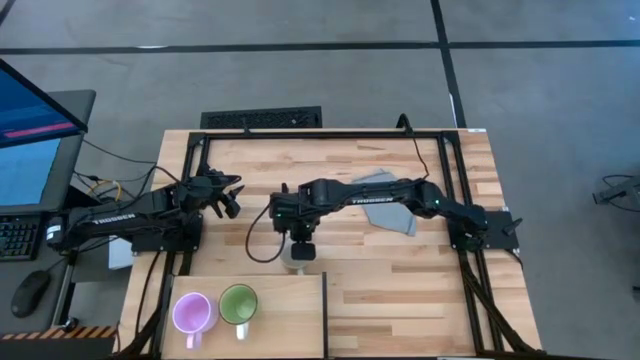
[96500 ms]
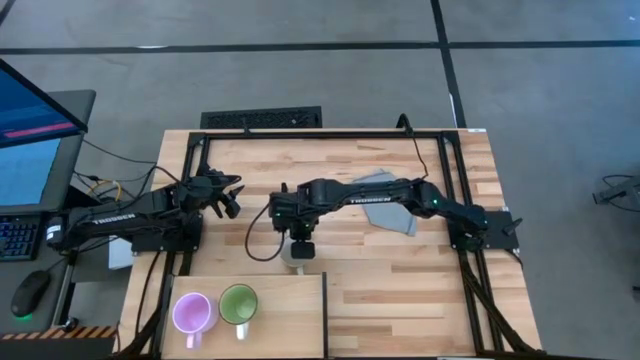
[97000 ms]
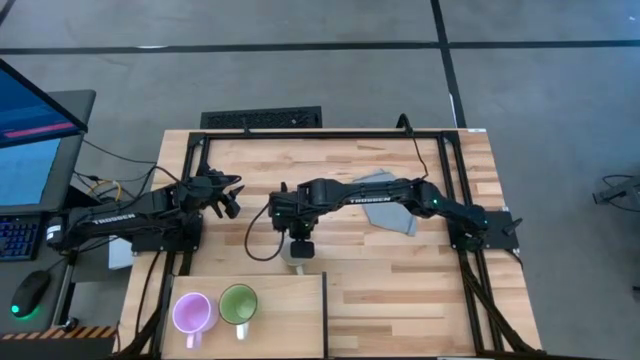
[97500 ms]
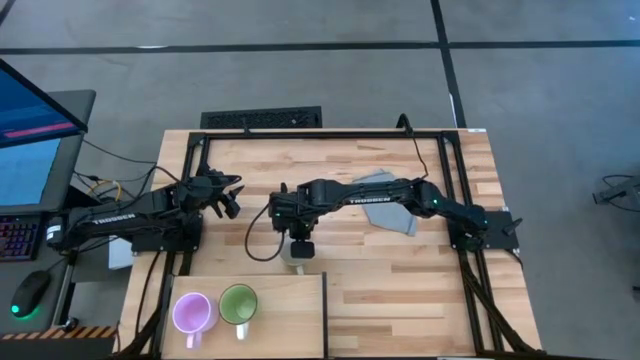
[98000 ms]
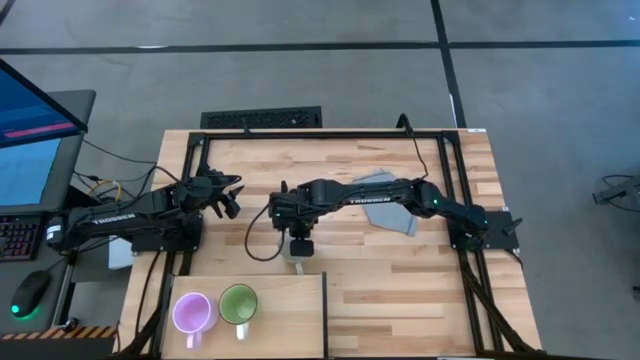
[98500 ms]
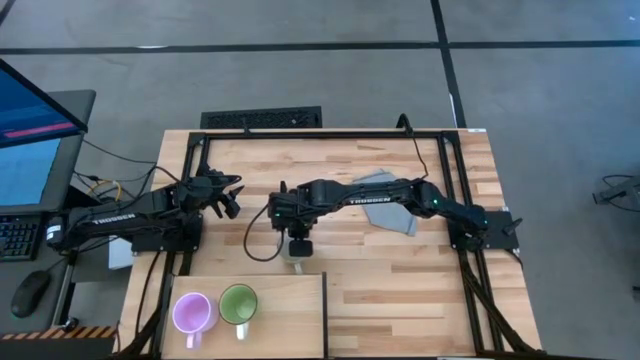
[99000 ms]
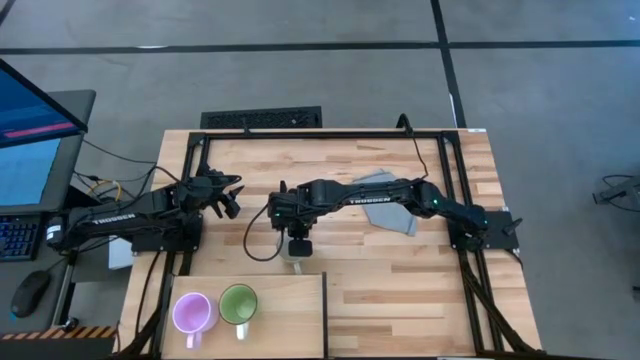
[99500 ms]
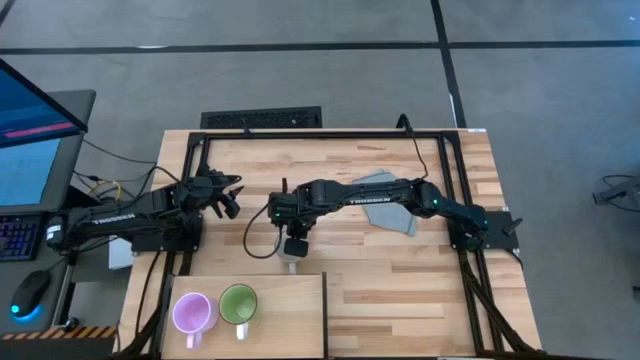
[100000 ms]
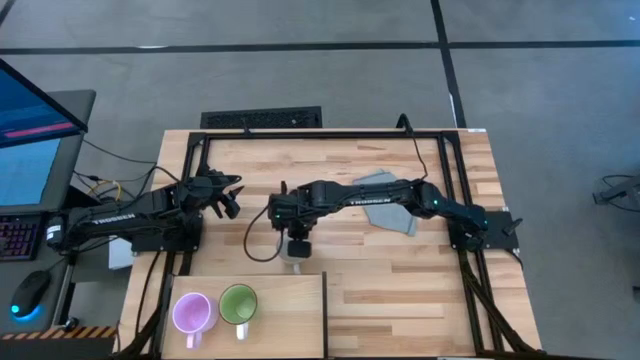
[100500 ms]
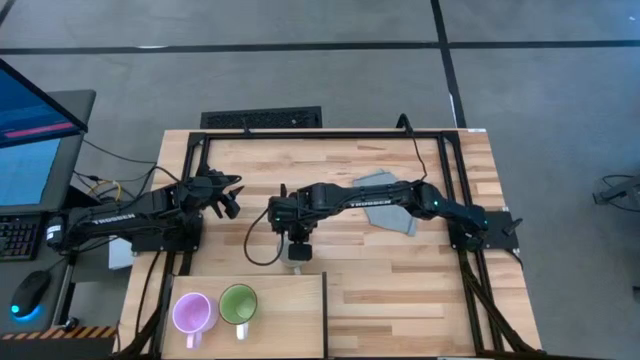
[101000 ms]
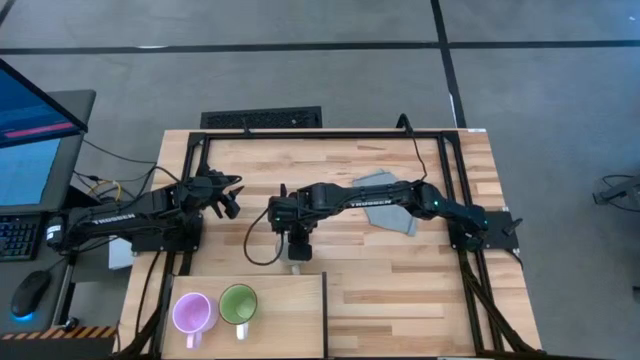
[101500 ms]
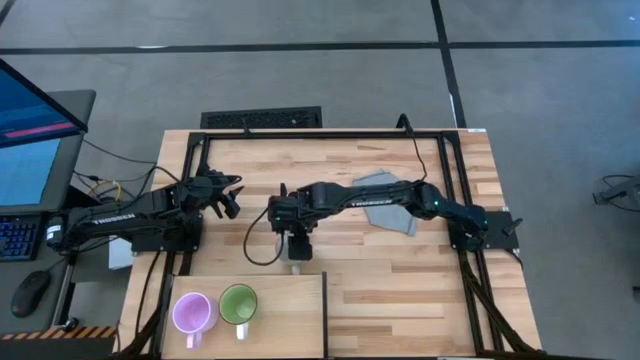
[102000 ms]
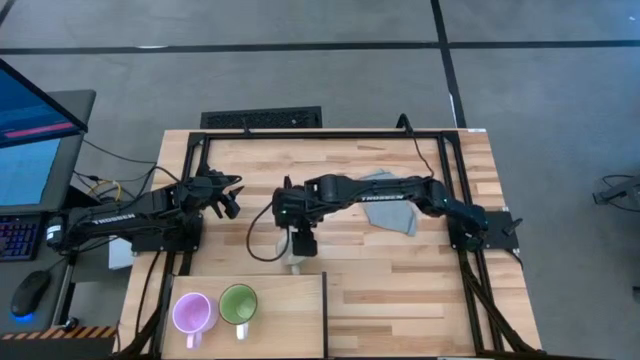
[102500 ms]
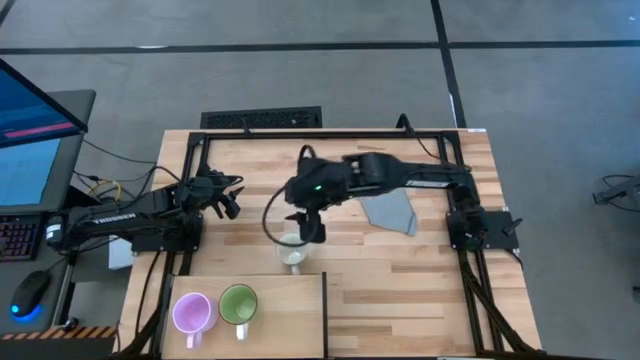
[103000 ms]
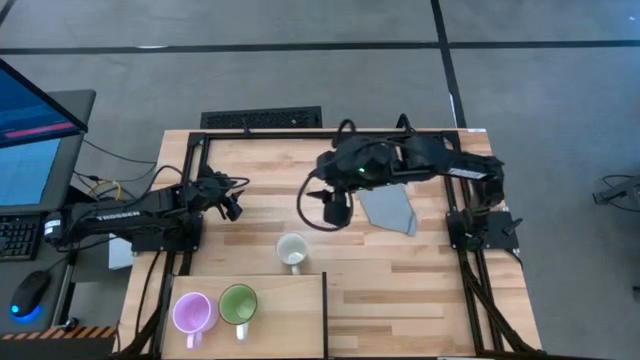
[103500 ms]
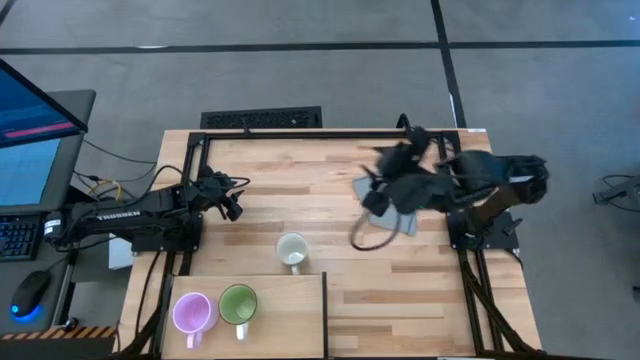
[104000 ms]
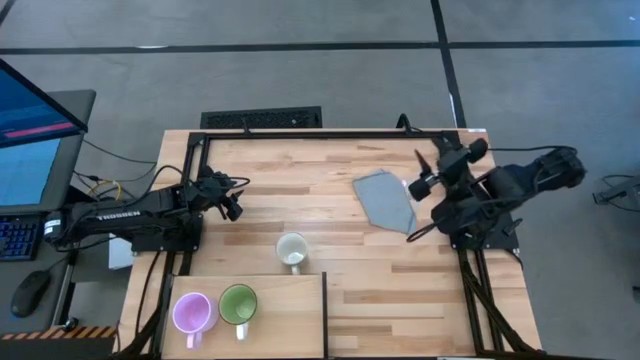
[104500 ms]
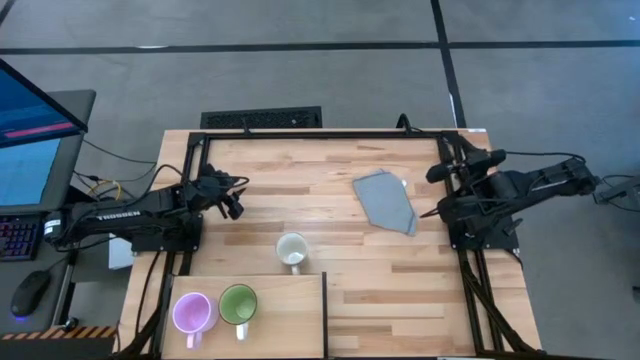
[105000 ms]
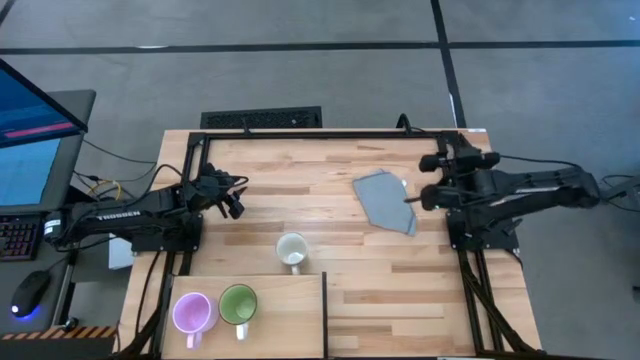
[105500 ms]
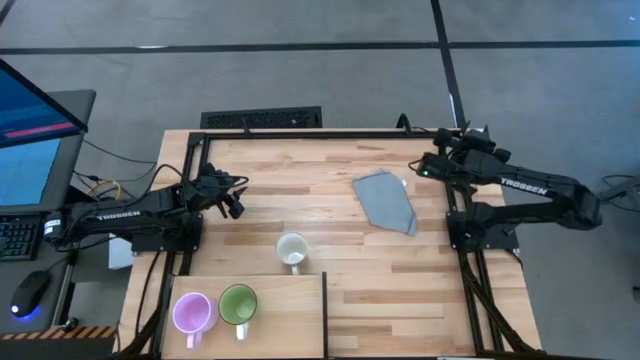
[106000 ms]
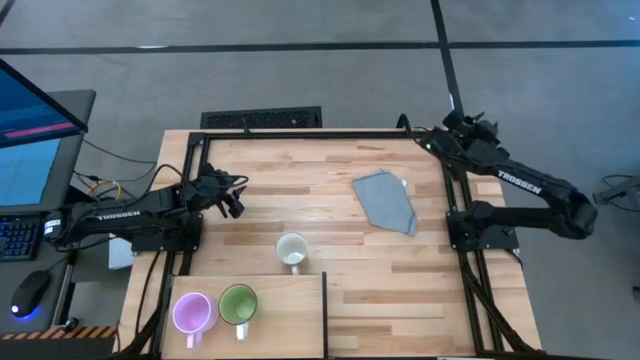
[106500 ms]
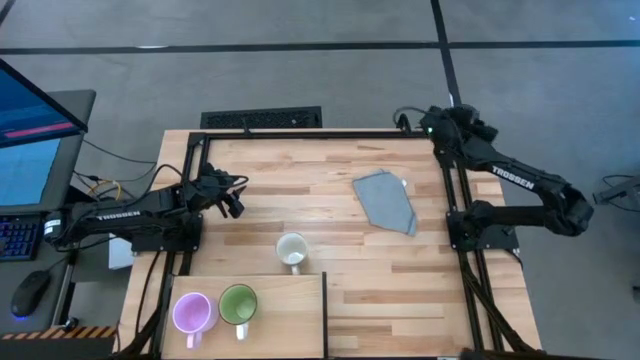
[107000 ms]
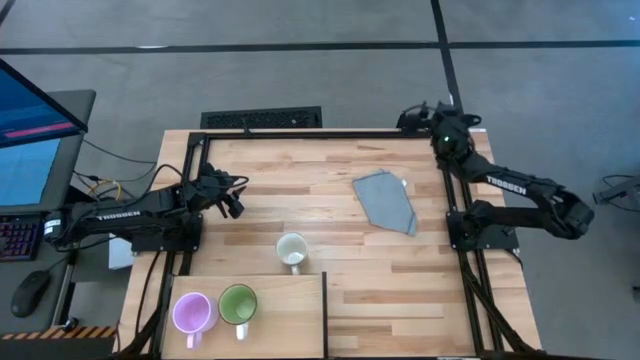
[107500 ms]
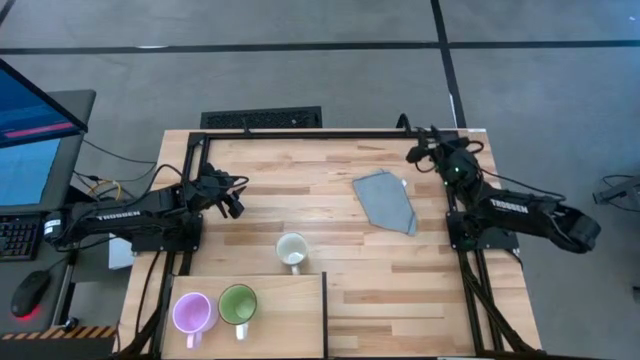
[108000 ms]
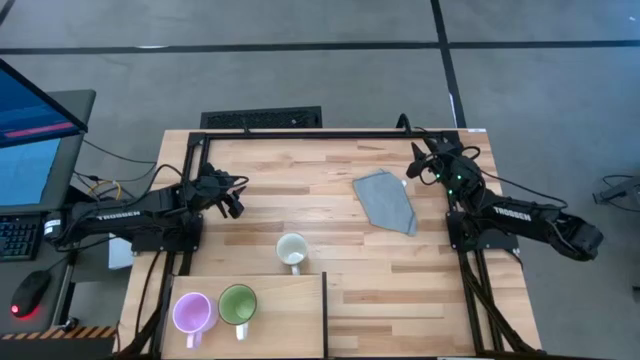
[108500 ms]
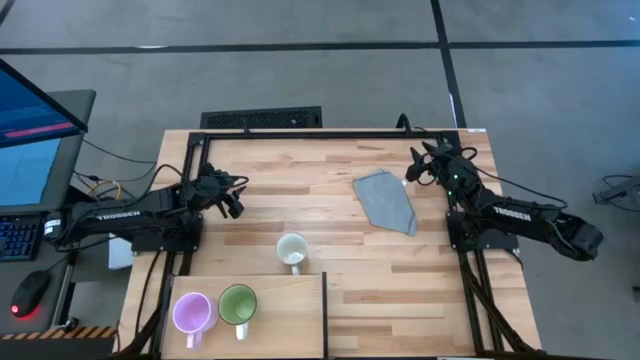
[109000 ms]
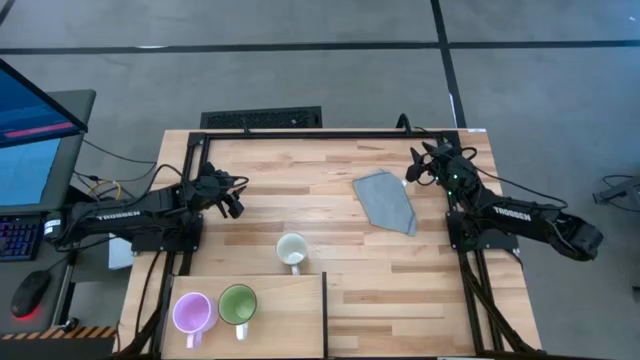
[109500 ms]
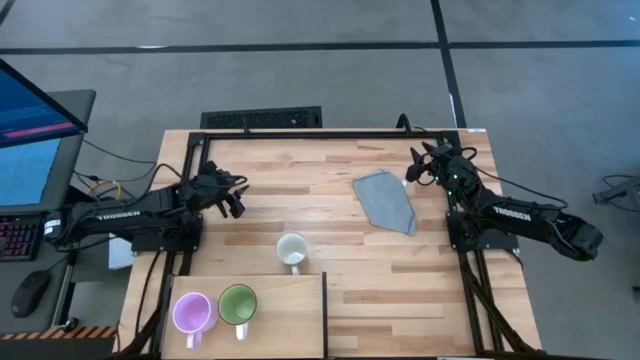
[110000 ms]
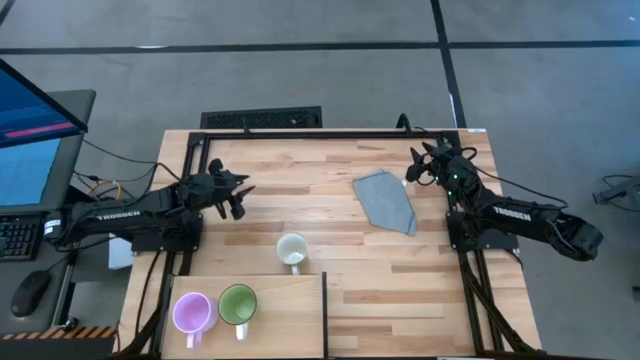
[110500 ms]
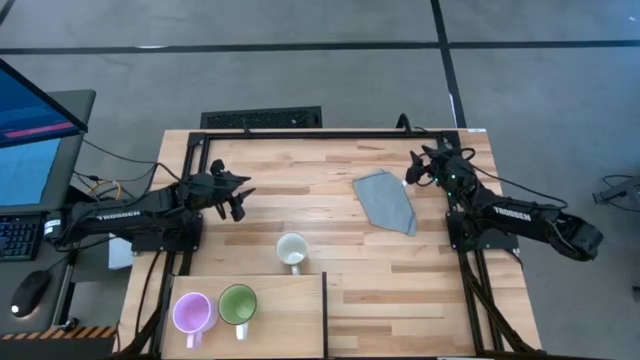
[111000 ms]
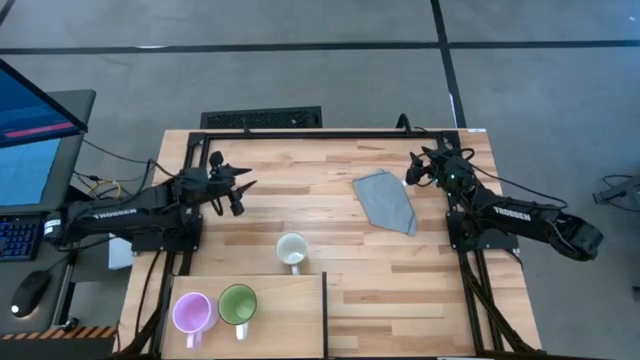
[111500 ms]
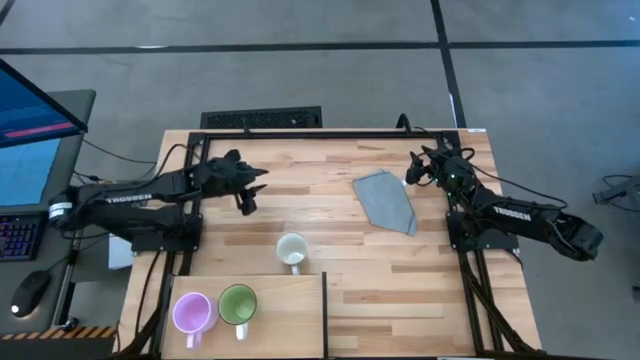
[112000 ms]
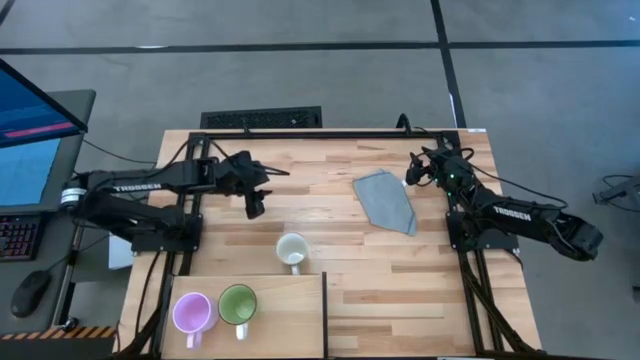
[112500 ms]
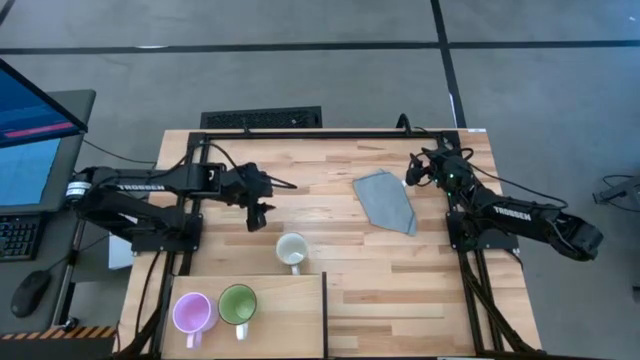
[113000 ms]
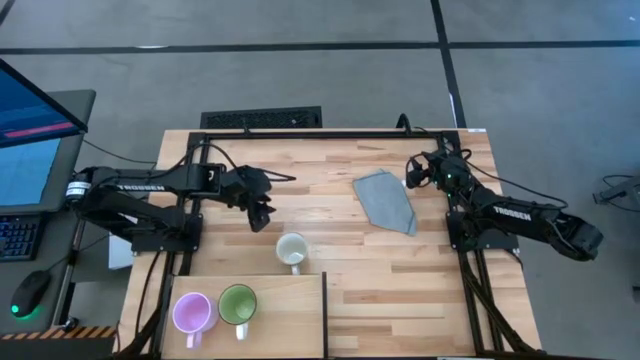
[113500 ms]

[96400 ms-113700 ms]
Task: Stack small to large cups/mugs on shelf
Put the light green mug on the shelf

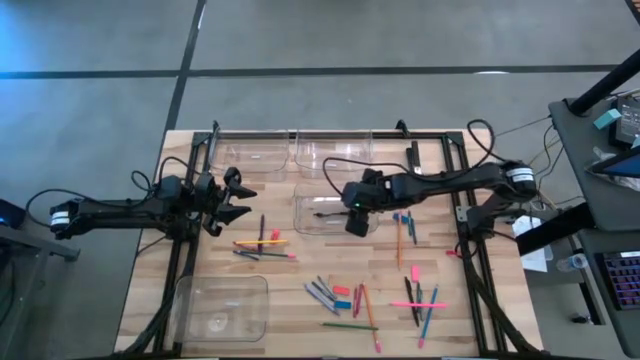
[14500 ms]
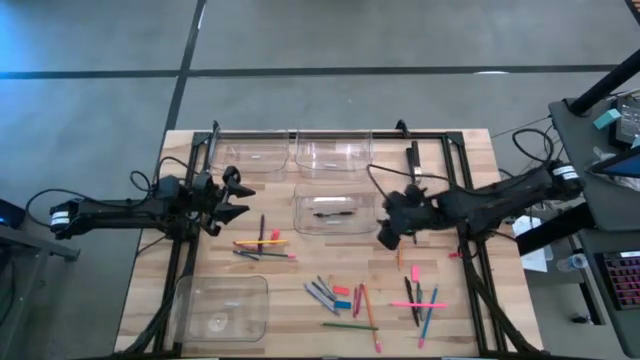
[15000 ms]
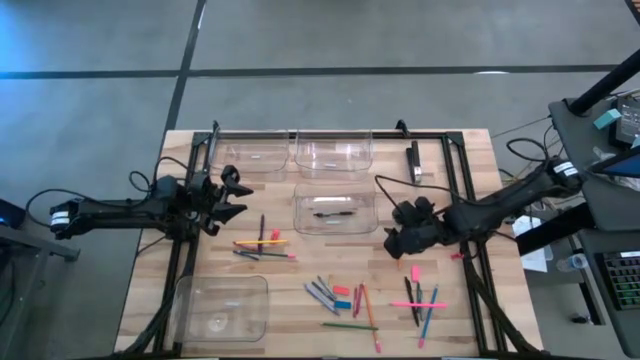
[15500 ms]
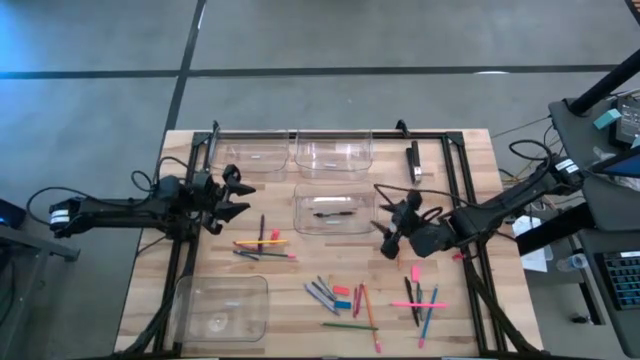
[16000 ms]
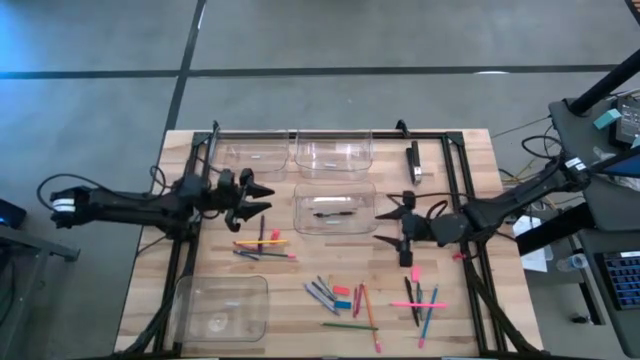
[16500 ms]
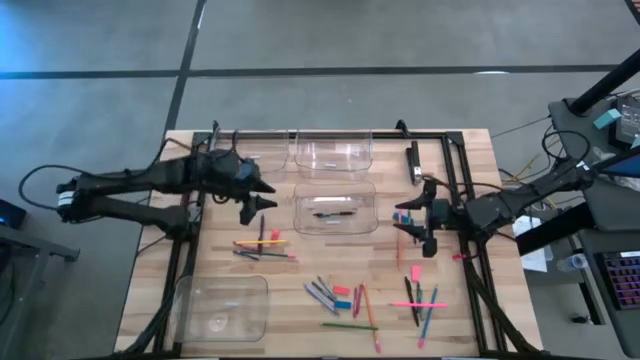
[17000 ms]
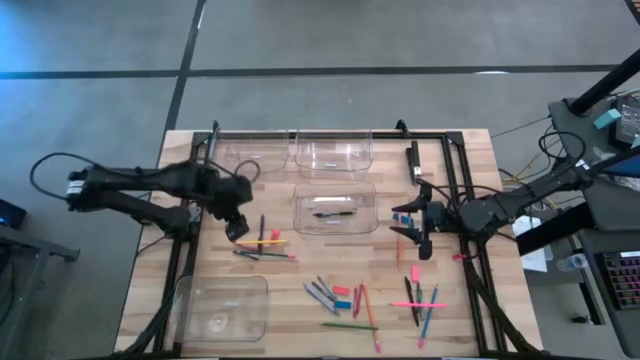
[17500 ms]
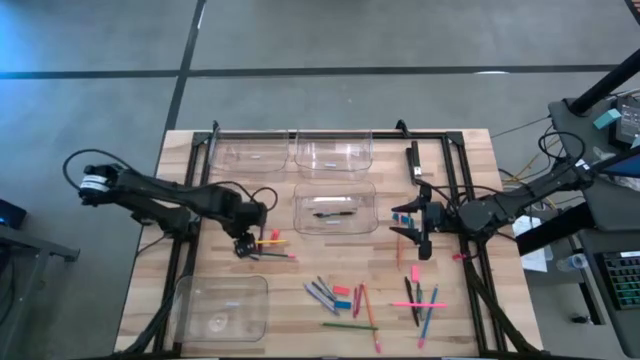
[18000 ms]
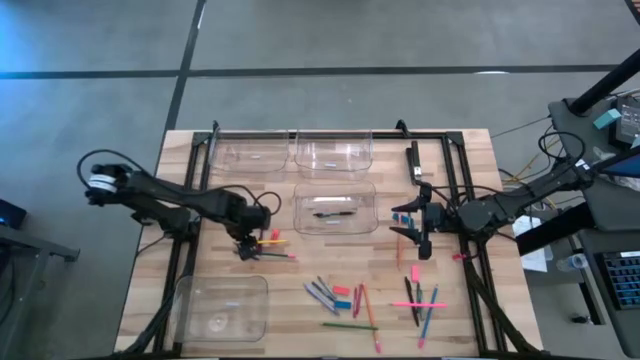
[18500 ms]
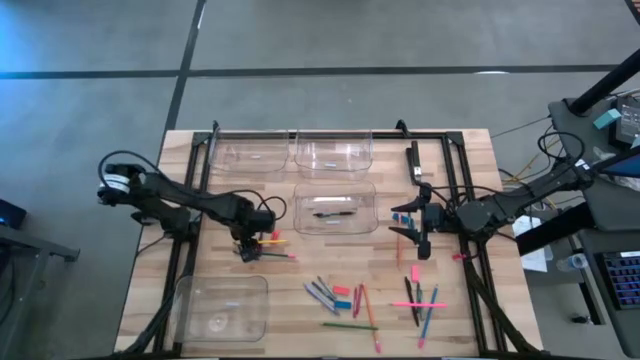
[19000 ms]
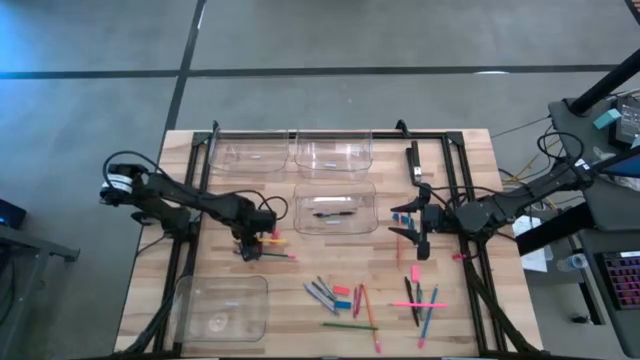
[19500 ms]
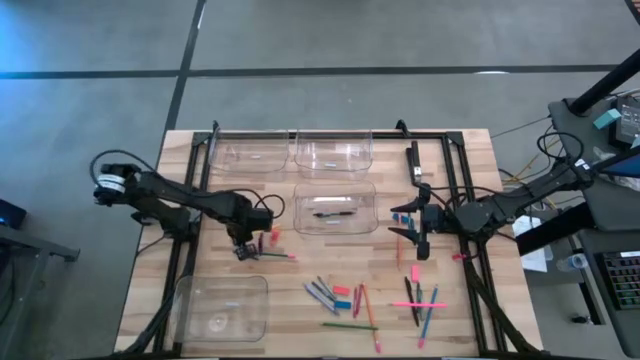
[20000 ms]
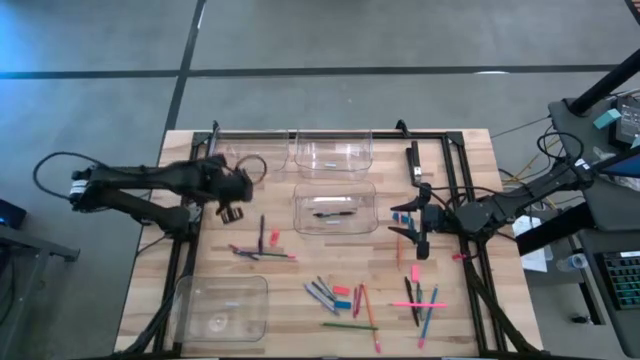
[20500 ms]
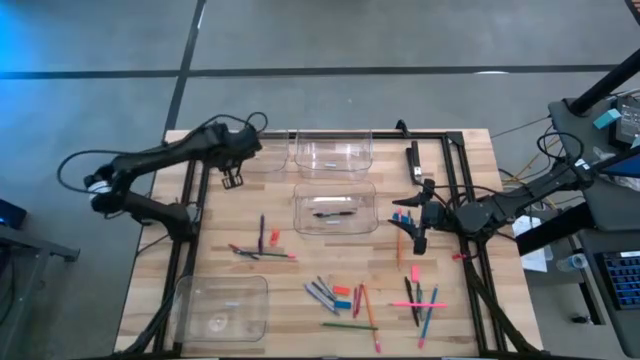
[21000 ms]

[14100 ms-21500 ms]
Task: Sort crayons/erasers/pens/pencils in bins
Put the yellow pencil into the top left transparent bin
